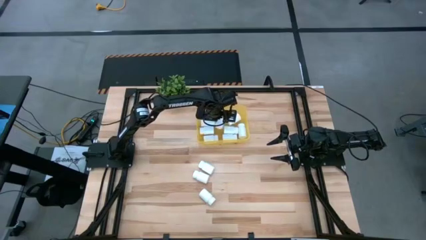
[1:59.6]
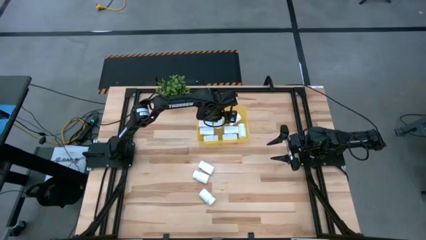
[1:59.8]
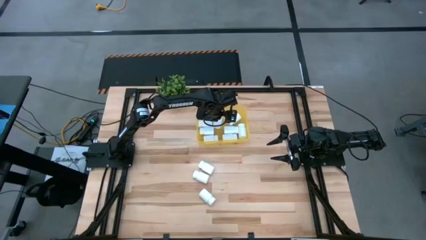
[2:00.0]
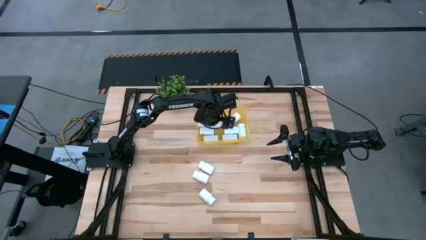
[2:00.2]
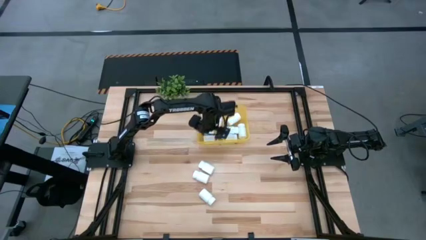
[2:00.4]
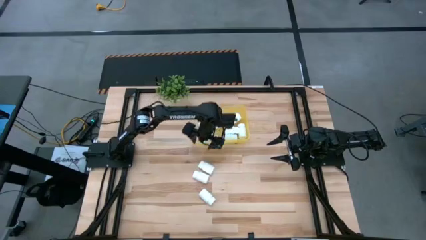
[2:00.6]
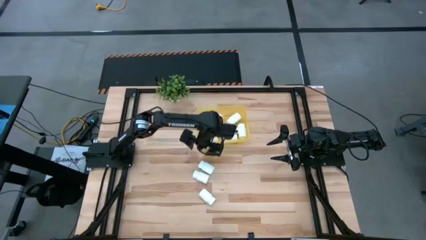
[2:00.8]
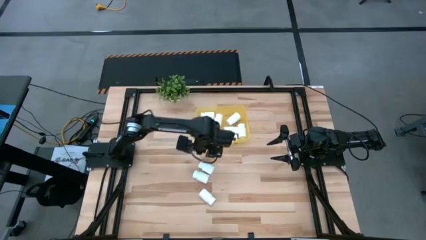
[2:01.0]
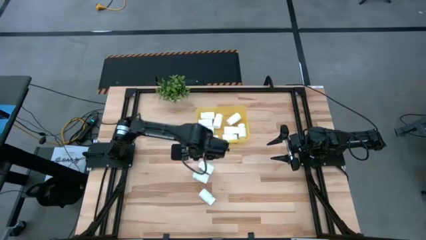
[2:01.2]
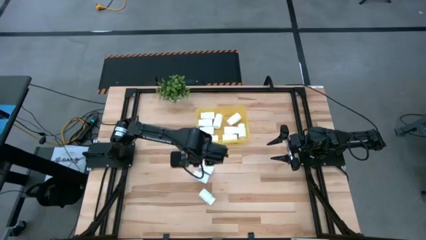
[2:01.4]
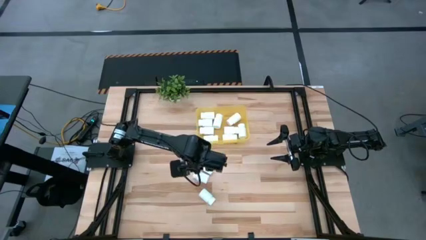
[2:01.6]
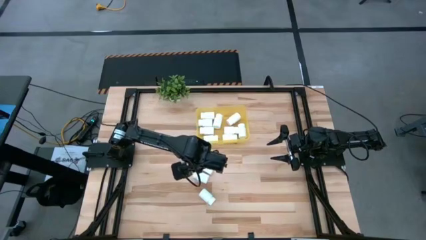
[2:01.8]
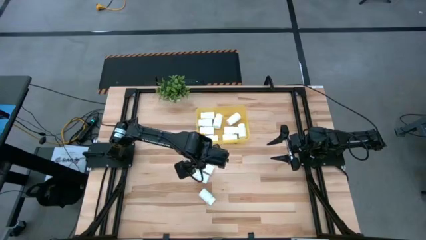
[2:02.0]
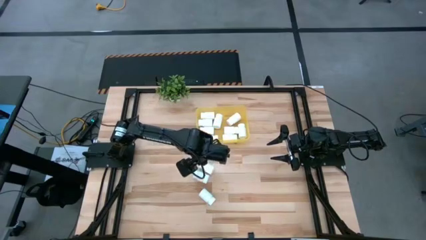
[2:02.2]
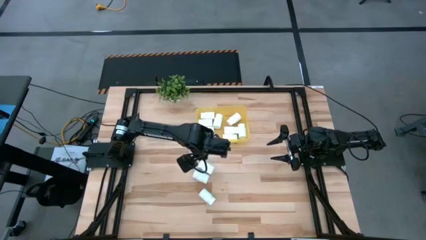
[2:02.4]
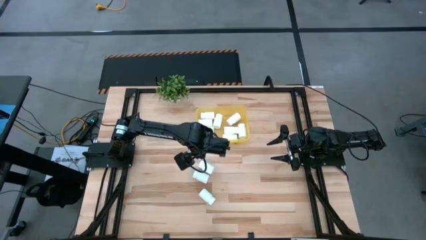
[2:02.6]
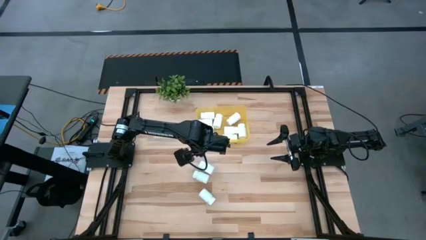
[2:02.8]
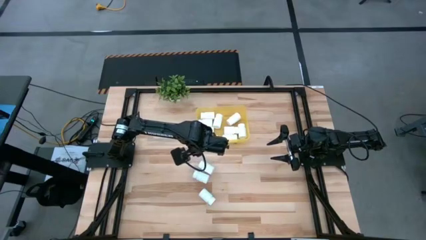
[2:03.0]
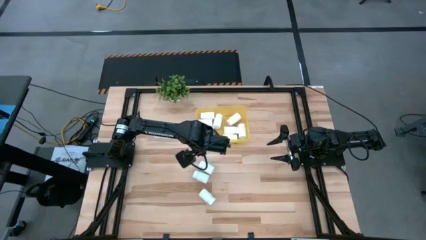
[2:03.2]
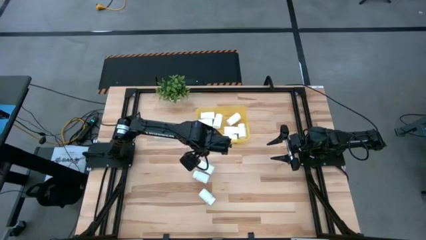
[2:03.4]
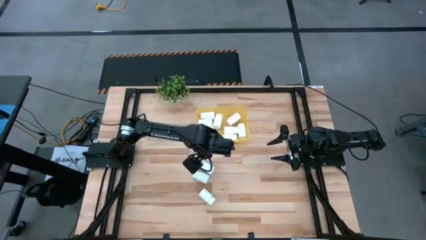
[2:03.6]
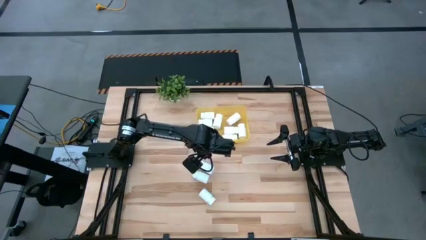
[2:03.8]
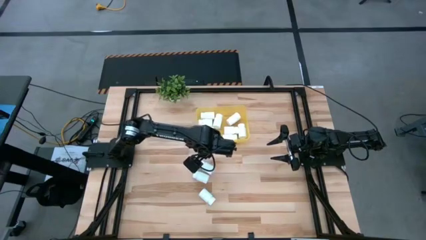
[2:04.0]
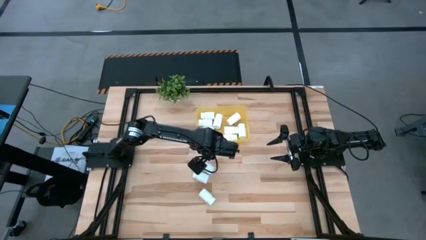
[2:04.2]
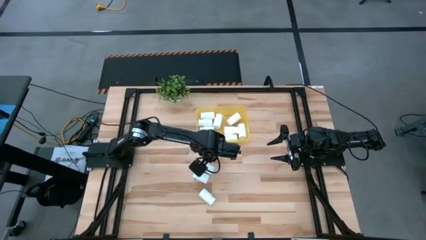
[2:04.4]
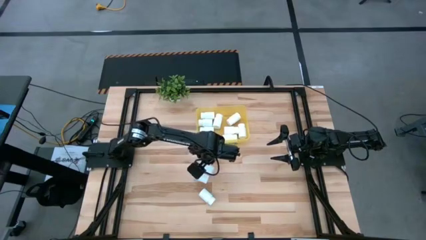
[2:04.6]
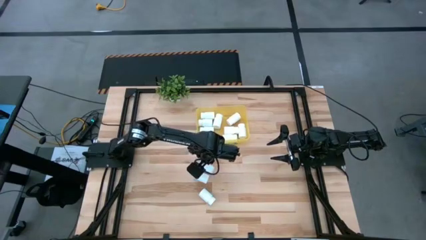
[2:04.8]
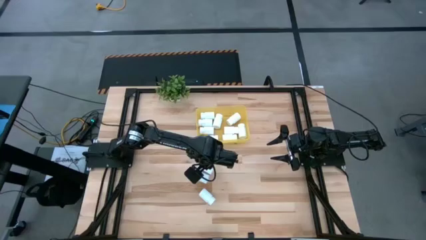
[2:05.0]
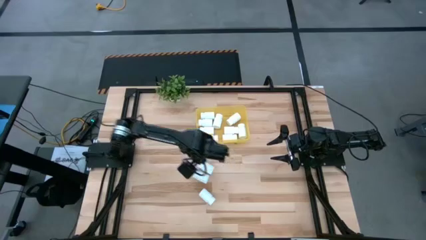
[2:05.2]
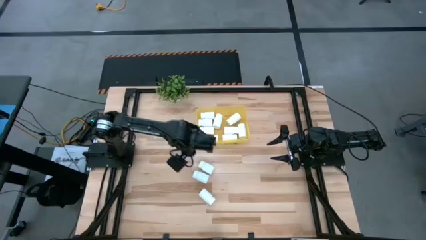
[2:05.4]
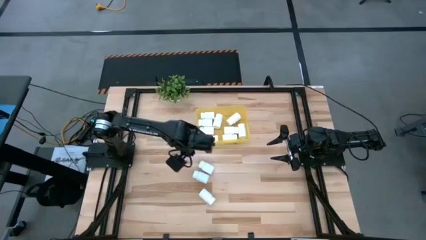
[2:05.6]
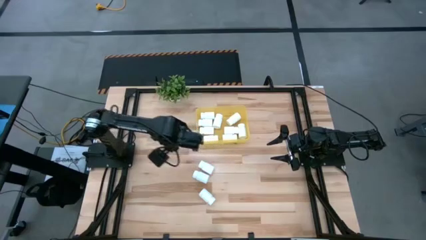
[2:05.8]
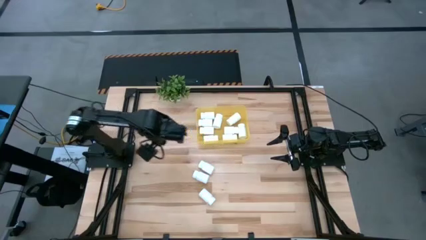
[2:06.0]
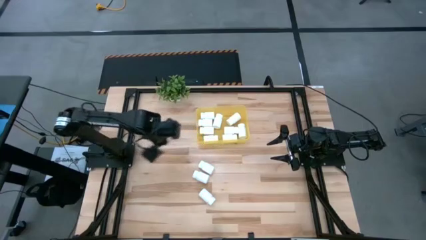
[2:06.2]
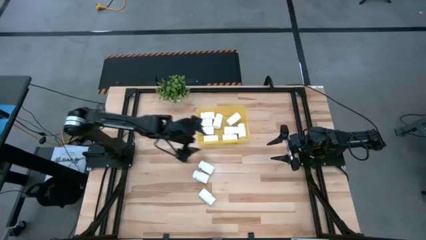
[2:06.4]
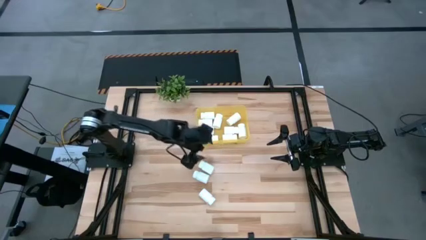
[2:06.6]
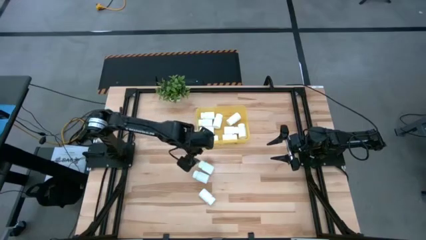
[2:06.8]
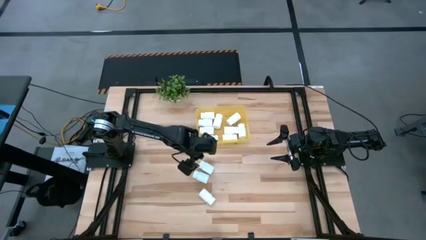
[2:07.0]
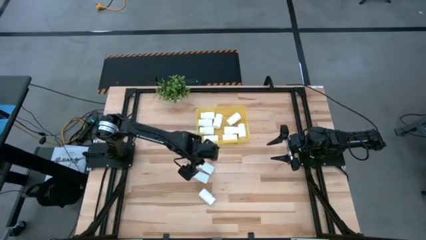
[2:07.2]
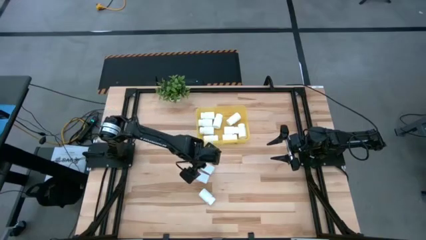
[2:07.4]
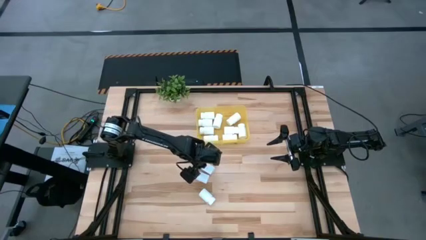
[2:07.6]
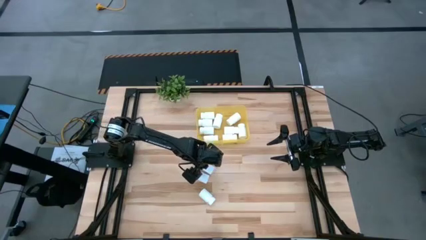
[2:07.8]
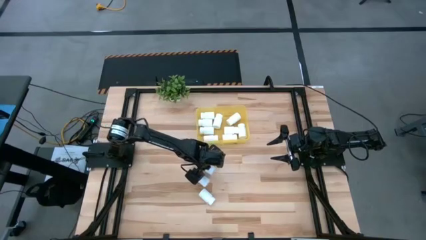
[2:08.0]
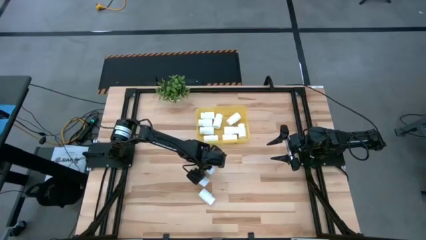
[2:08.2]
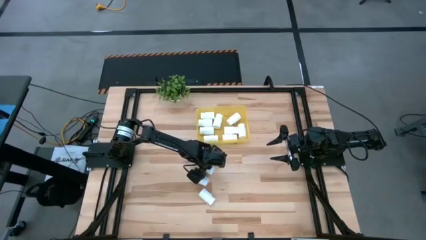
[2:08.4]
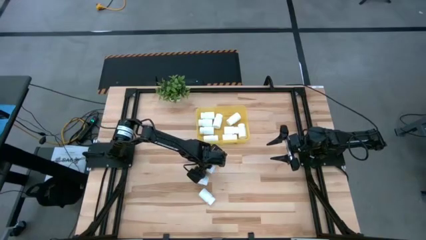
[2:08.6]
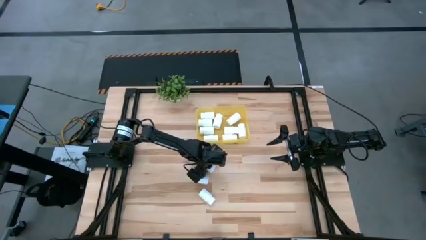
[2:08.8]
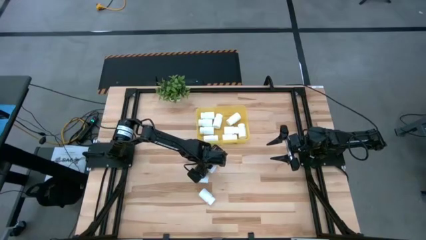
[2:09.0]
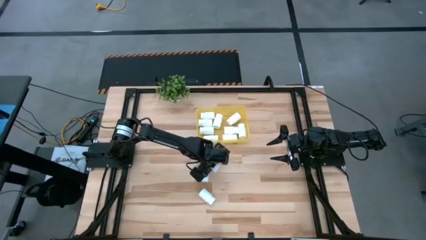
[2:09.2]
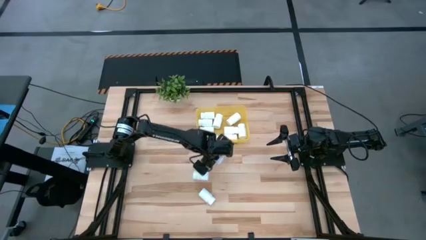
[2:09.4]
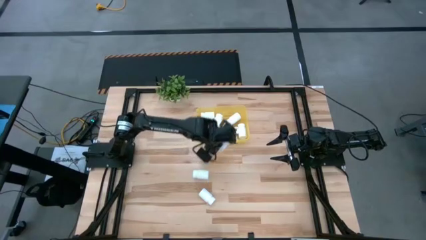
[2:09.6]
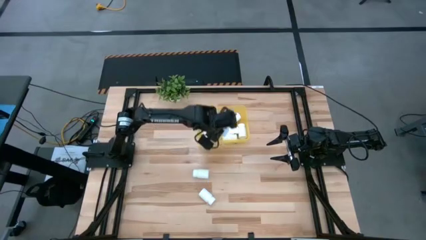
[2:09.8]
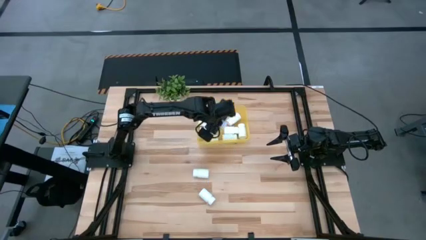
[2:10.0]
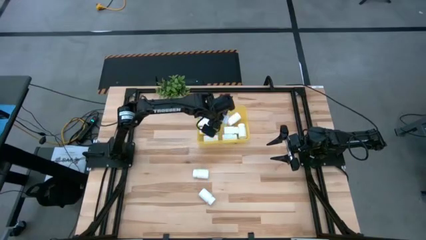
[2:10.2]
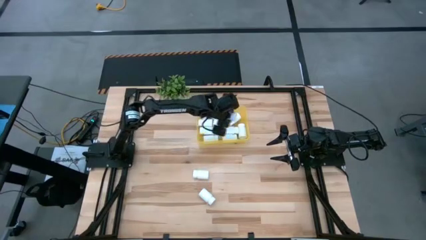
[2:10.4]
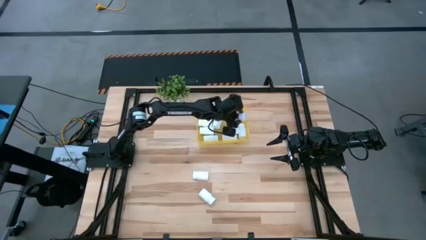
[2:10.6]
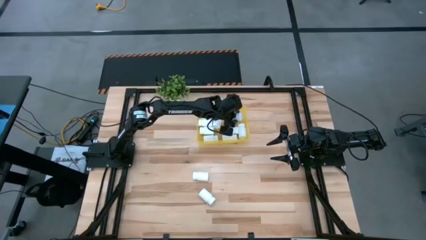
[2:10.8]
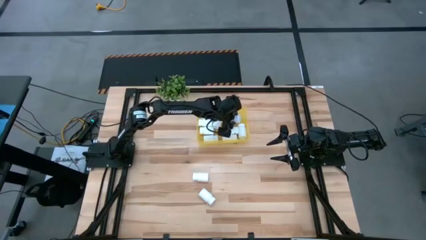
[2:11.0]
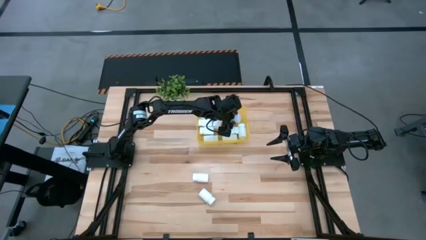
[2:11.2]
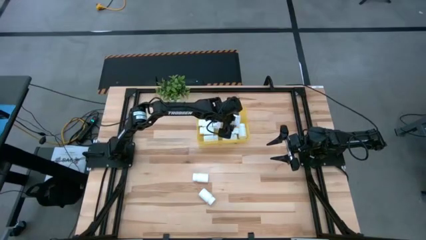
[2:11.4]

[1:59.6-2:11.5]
Task: Pick and place pill bottles into a basket
Put the white pill bottle into the yellow bin

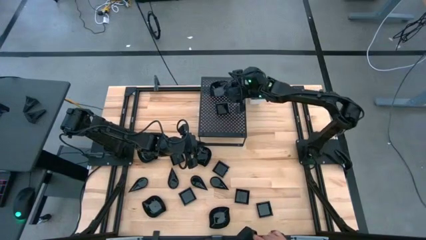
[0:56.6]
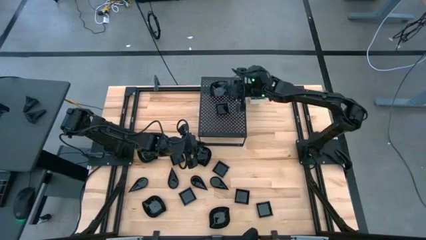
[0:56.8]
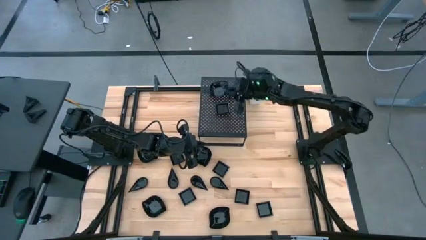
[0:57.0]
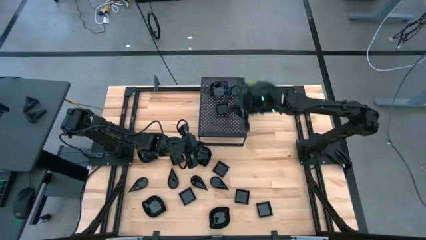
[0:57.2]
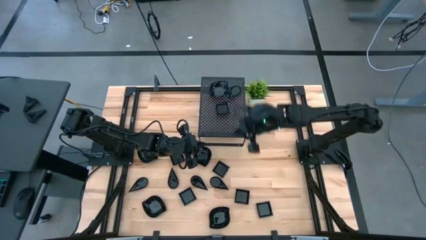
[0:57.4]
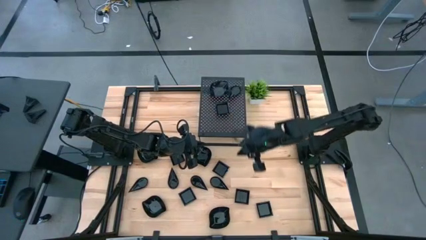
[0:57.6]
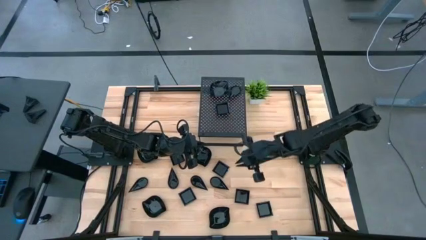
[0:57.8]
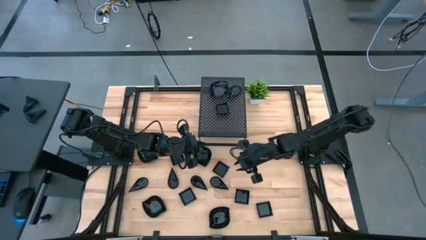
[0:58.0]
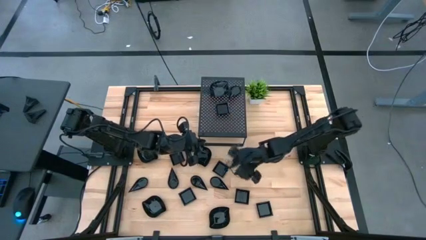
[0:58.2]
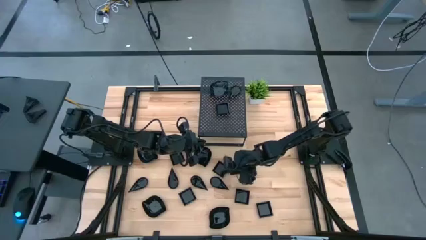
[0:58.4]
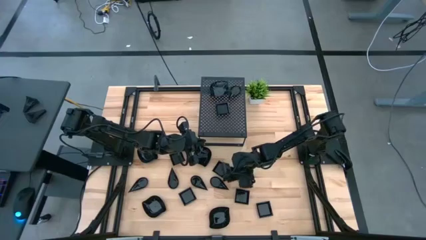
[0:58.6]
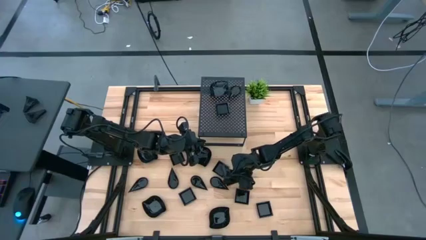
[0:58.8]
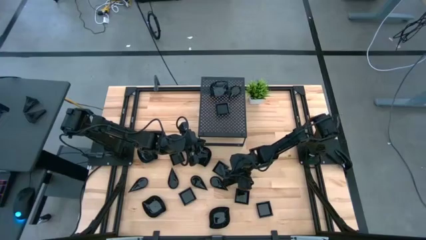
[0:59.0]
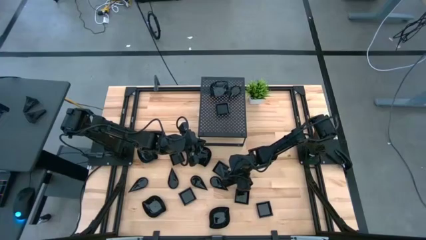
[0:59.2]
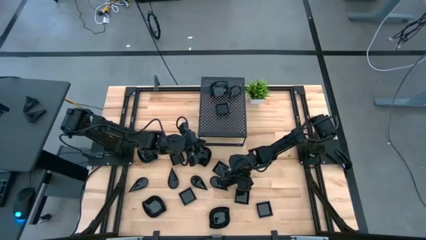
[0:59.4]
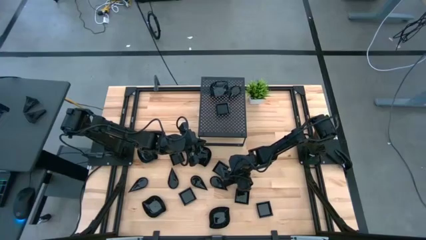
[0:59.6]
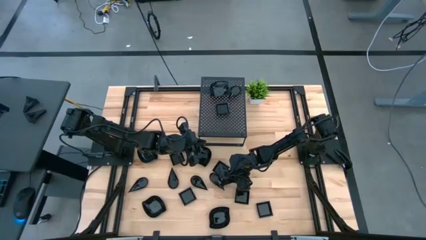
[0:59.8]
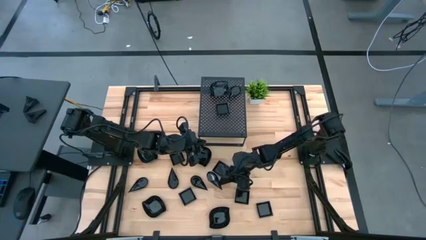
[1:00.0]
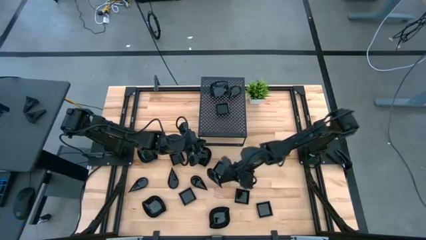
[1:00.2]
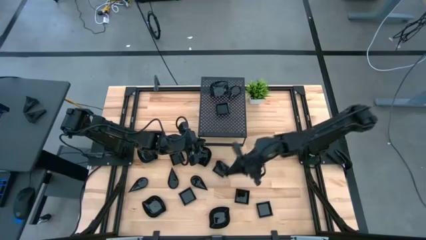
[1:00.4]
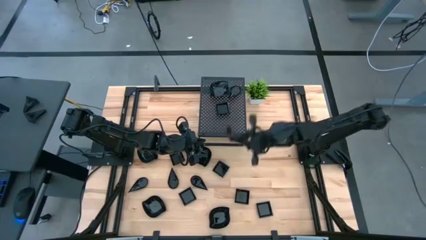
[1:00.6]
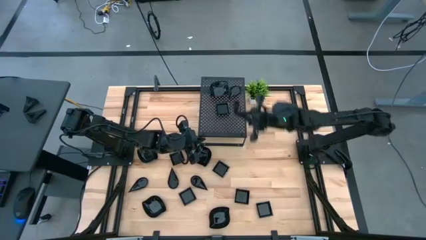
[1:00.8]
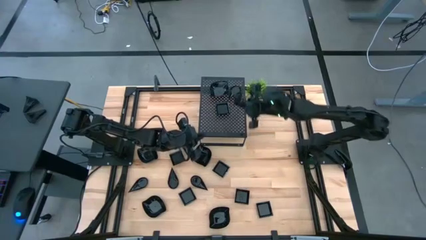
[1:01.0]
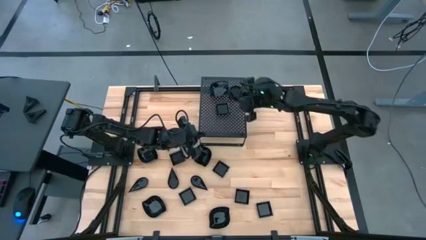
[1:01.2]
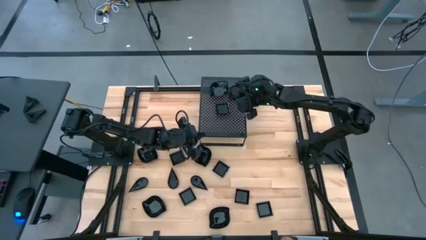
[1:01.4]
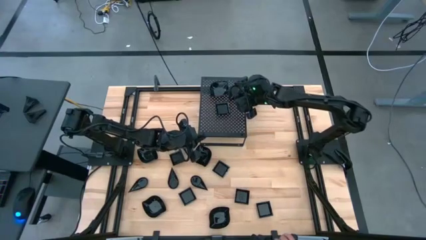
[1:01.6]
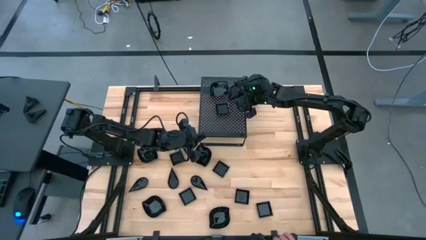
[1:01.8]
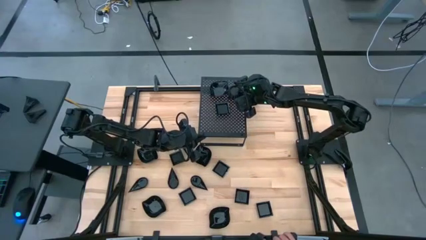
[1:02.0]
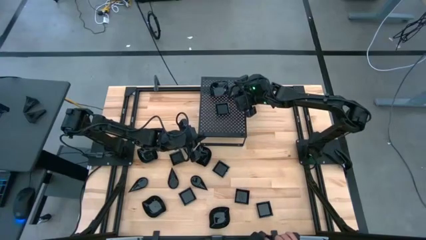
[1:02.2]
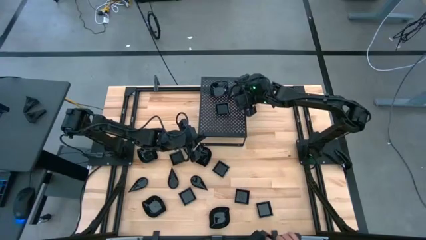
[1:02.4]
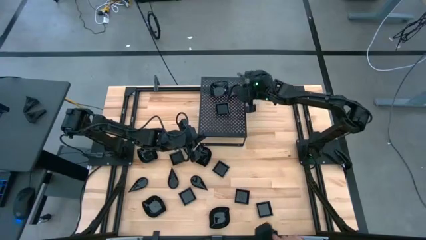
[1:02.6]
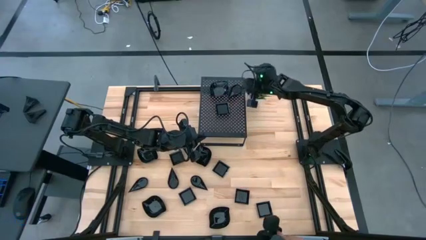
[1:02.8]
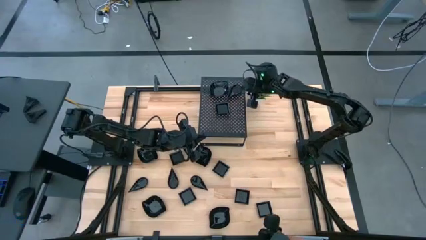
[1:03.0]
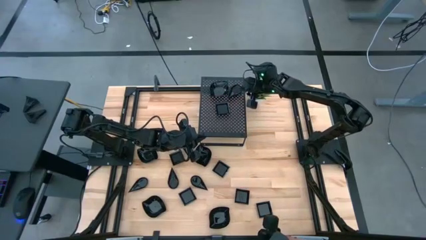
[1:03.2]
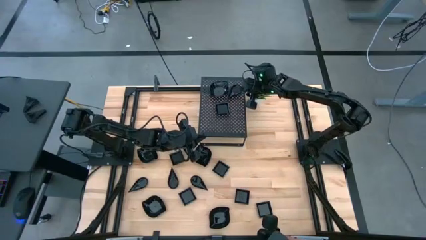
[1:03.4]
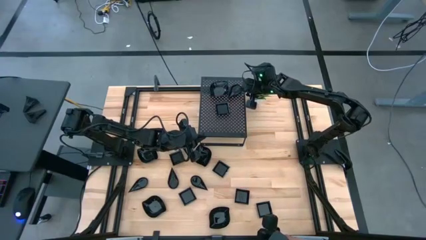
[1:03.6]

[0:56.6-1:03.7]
Task: Pick & Place Mini shaped plates
Stack the black drop-shaped plate on top of the black drop-shaped plate on the shelf
